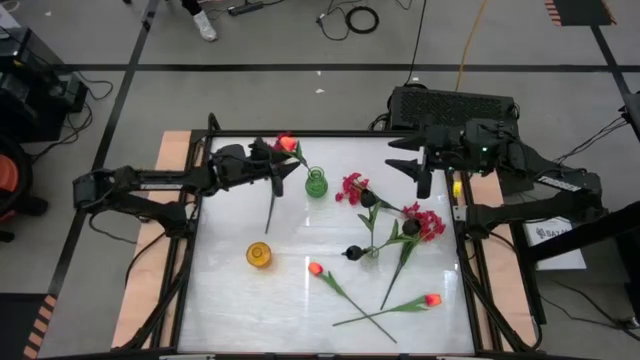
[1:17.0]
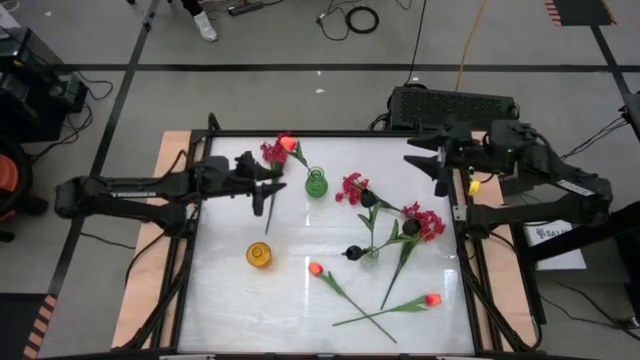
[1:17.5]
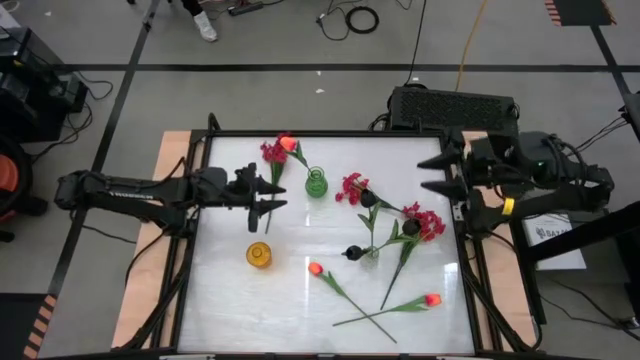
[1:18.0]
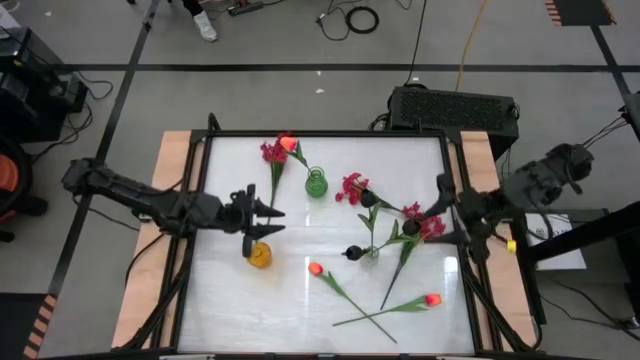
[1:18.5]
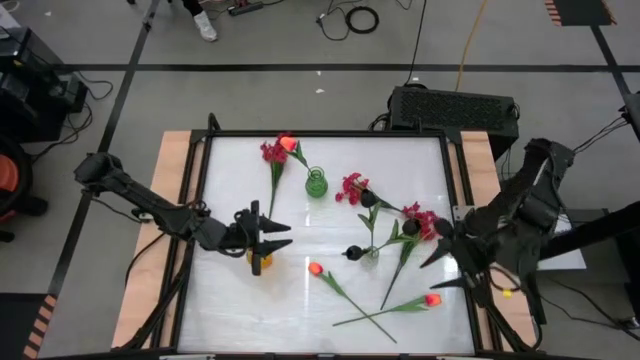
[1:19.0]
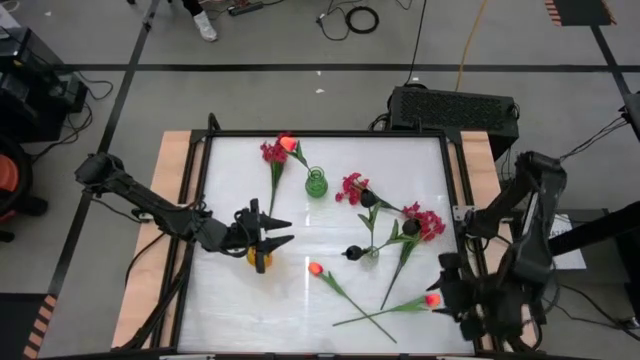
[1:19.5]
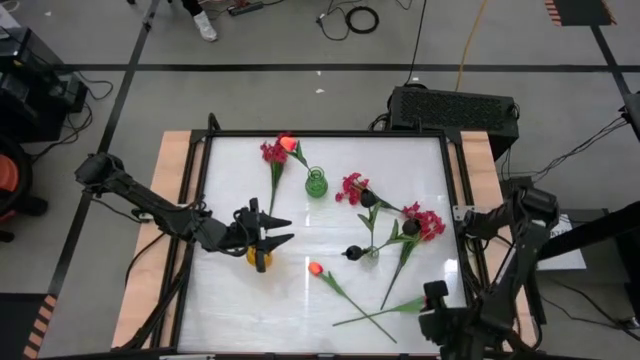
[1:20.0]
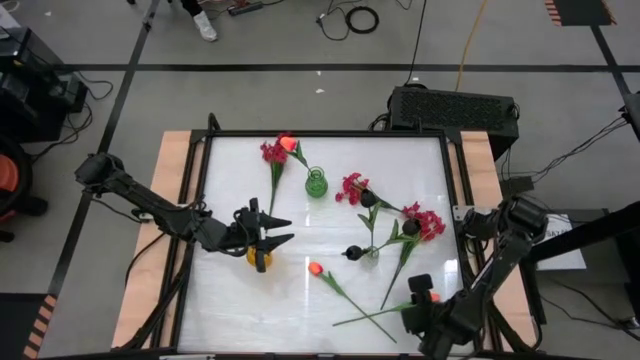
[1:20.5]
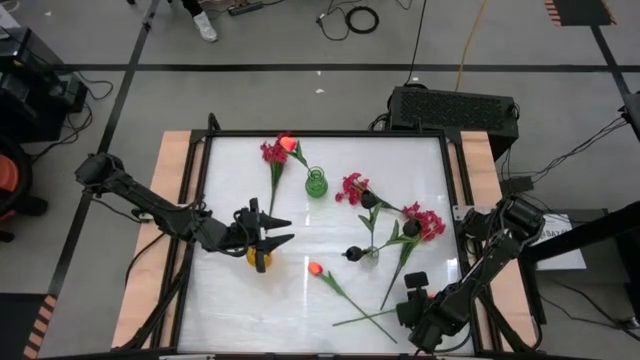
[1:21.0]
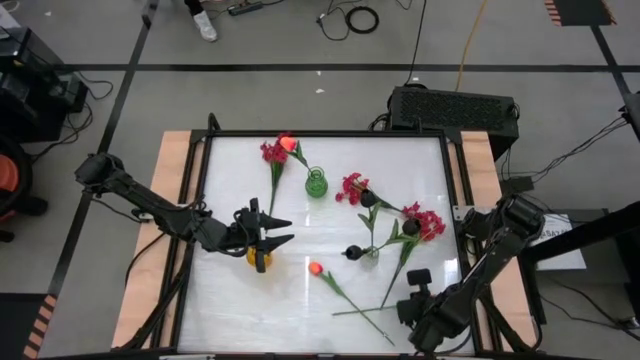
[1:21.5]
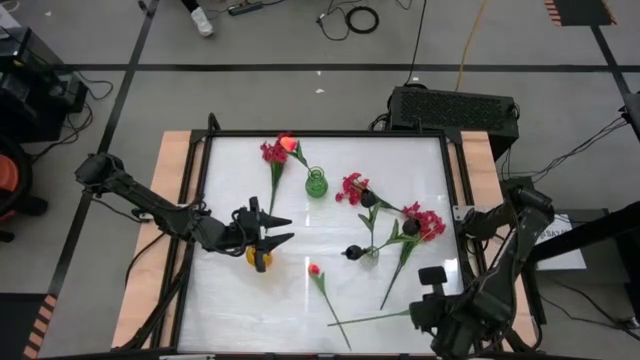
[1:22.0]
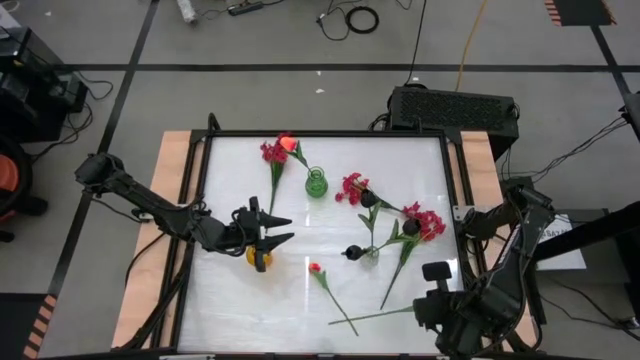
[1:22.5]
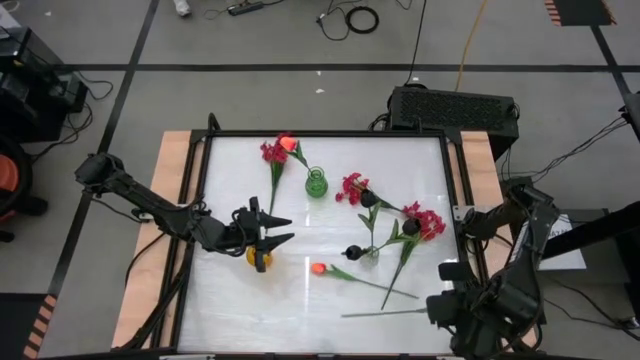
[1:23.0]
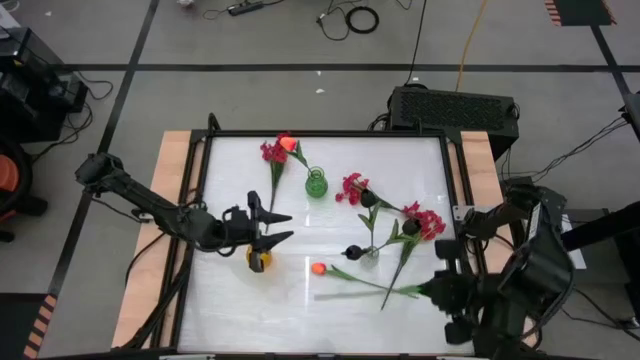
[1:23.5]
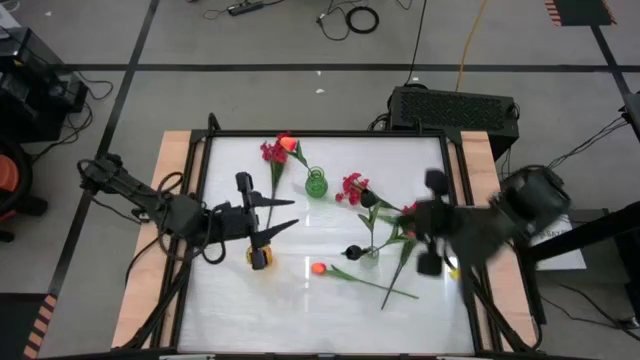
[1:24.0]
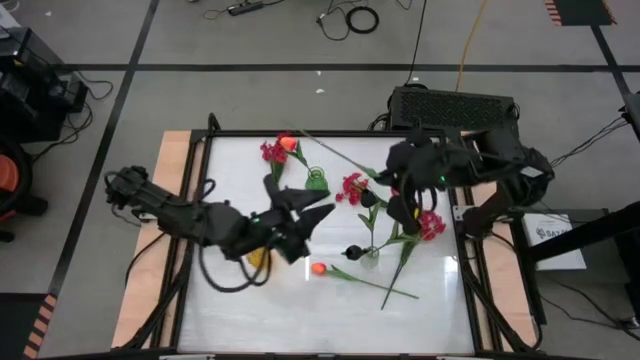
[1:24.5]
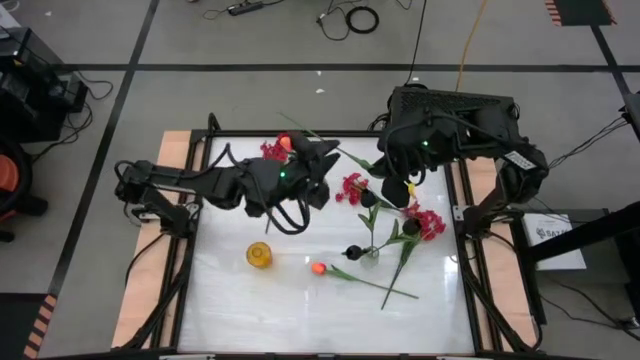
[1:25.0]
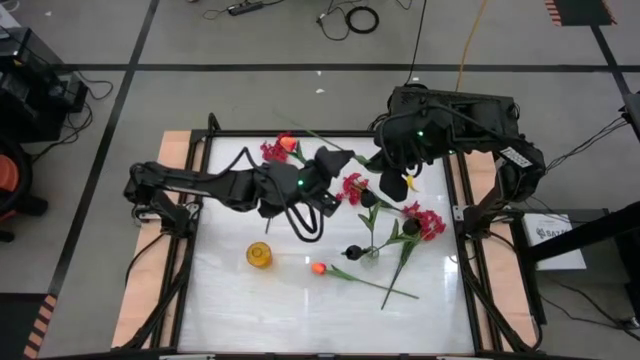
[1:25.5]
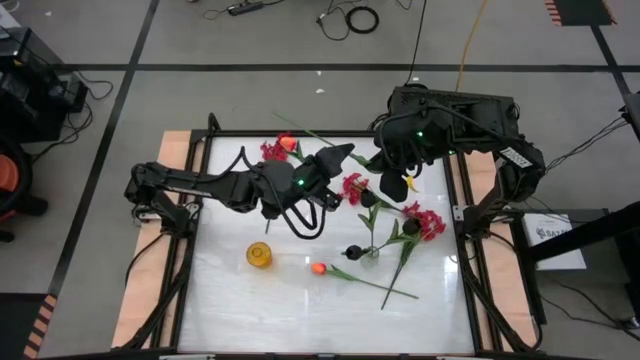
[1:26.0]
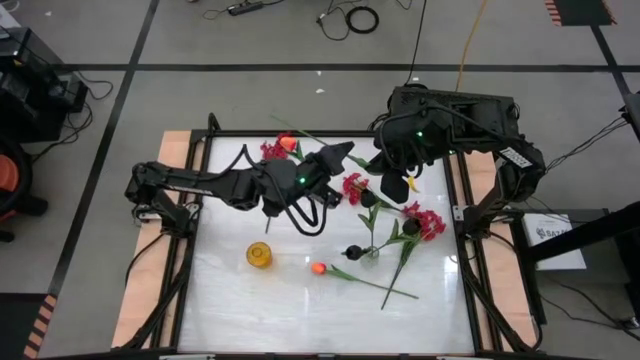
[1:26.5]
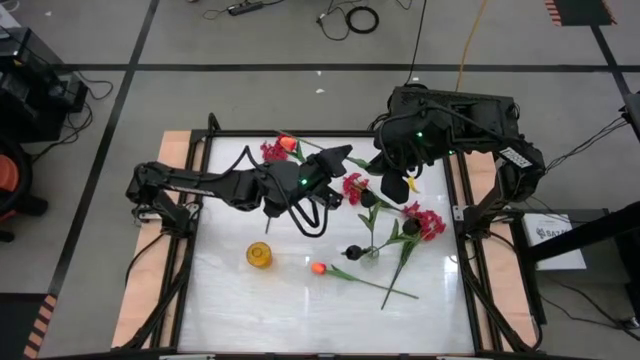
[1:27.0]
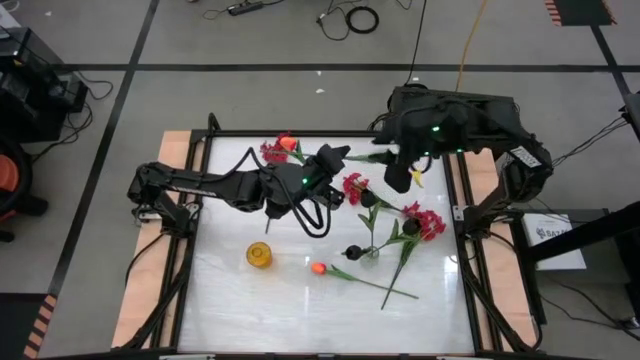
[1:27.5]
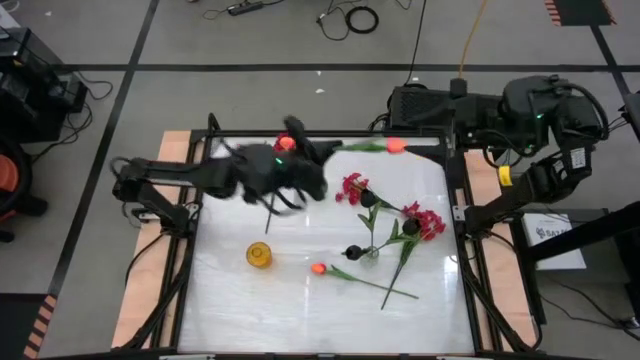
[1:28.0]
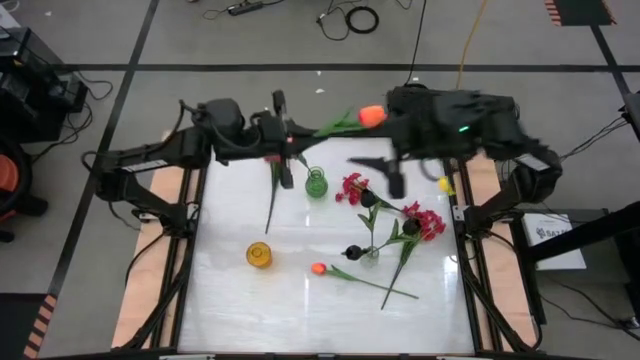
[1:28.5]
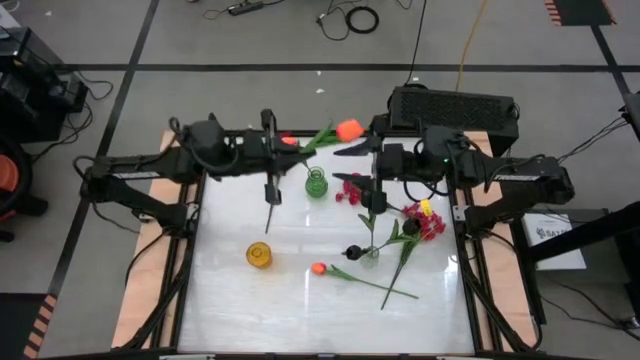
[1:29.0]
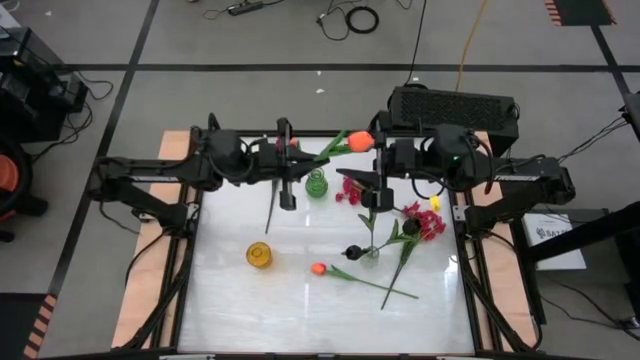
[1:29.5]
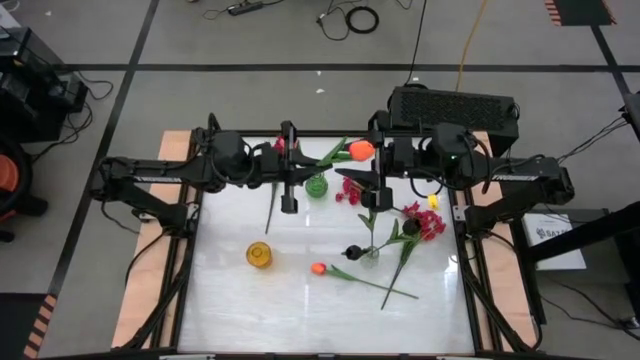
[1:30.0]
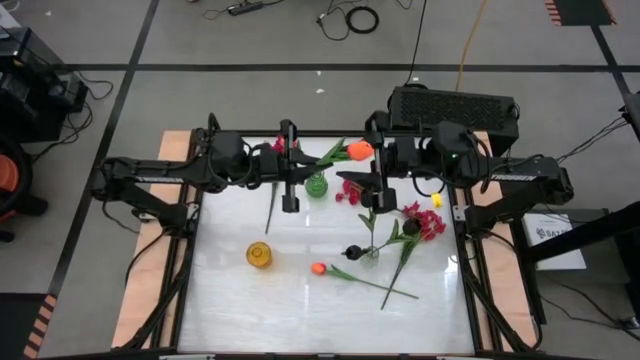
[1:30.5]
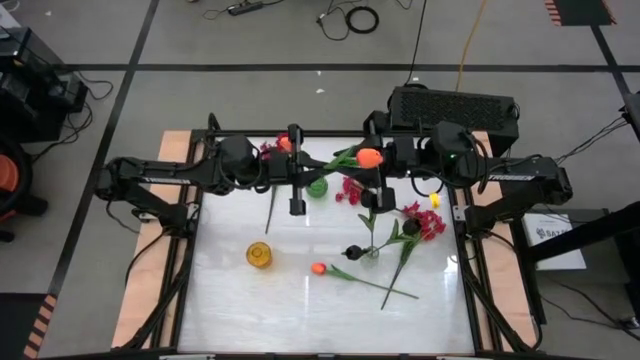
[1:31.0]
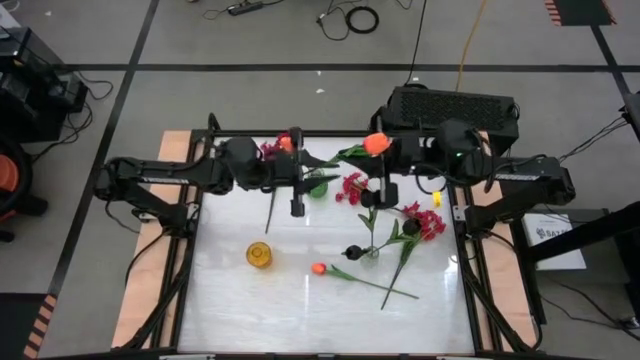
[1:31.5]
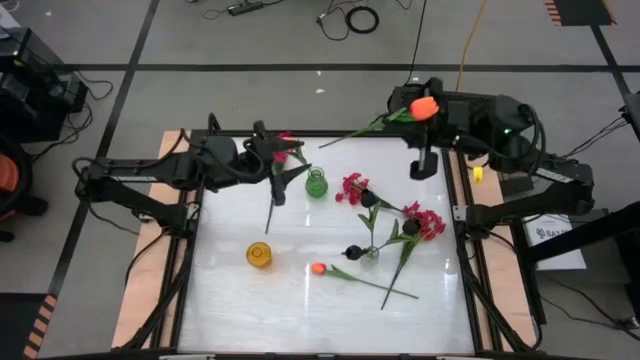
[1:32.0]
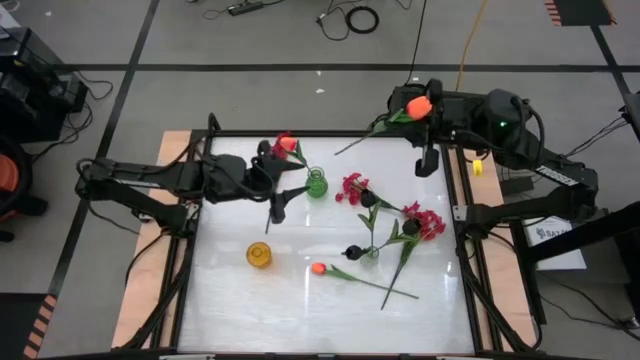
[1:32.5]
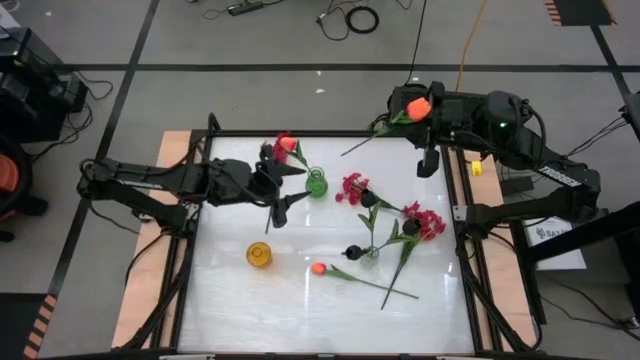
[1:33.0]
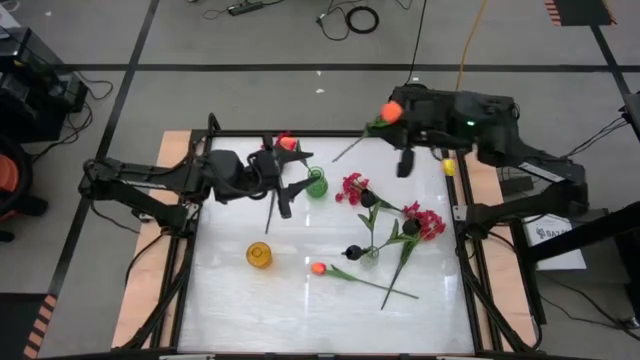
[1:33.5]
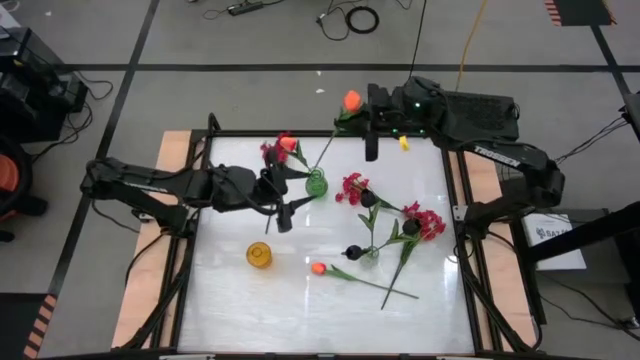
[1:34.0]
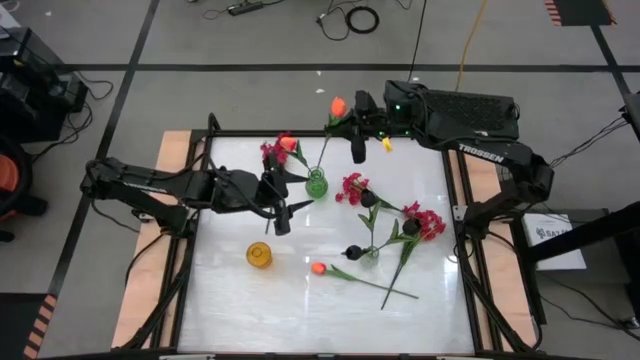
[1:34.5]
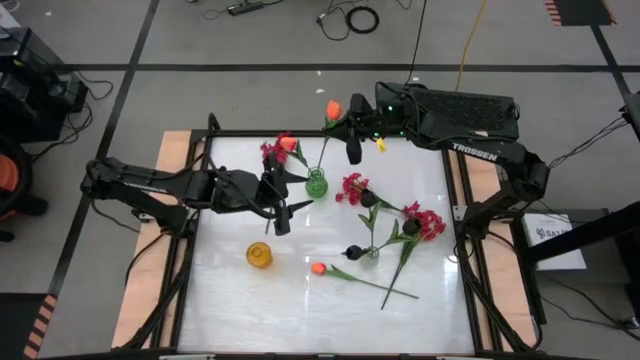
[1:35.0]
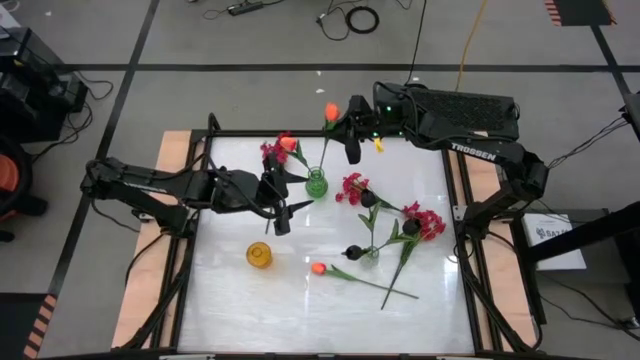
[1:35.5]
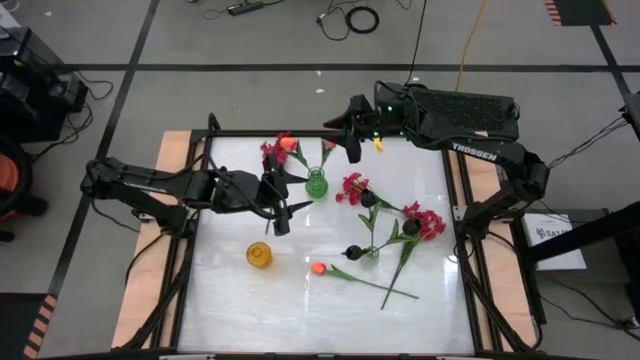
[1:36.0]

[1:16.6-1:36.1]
Task: Sort flowers into vase by color
Put the right orange flower into the green vase

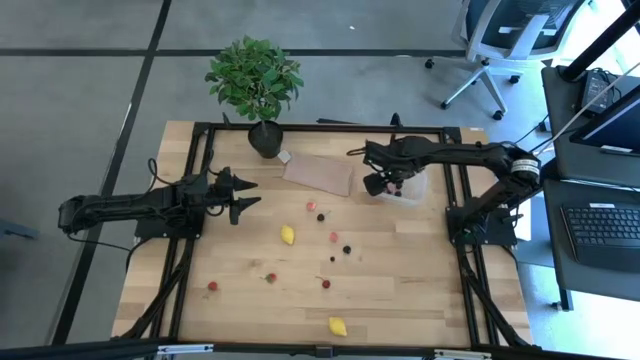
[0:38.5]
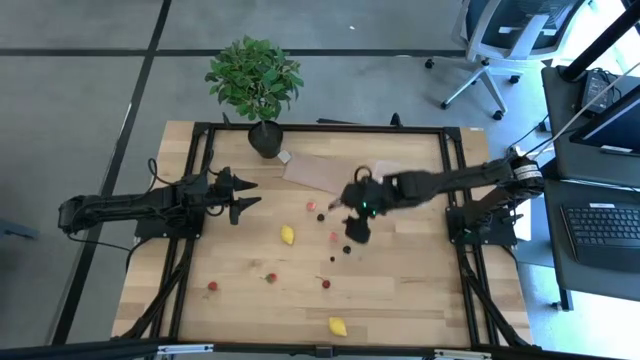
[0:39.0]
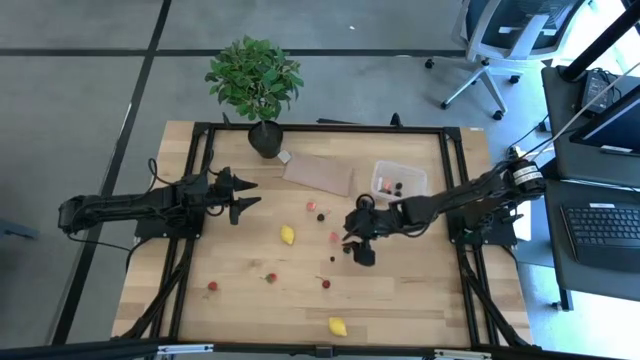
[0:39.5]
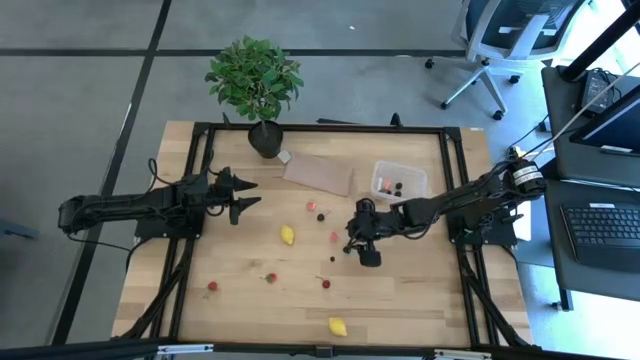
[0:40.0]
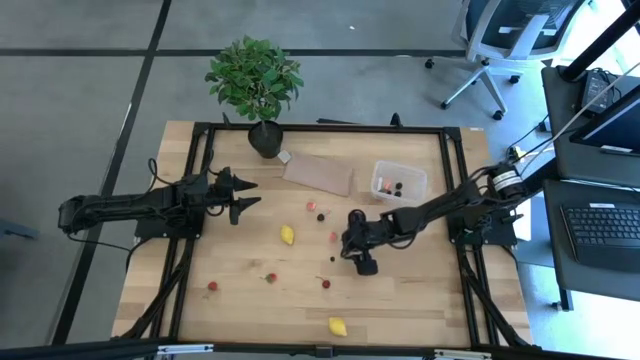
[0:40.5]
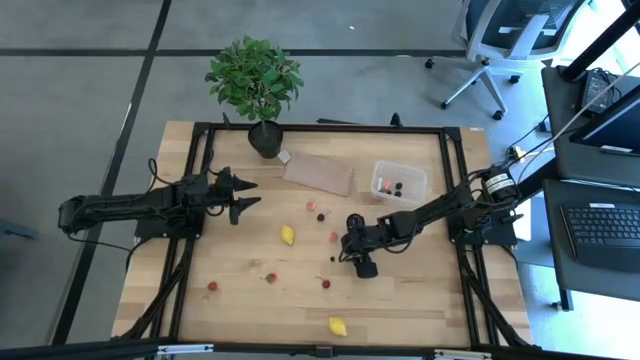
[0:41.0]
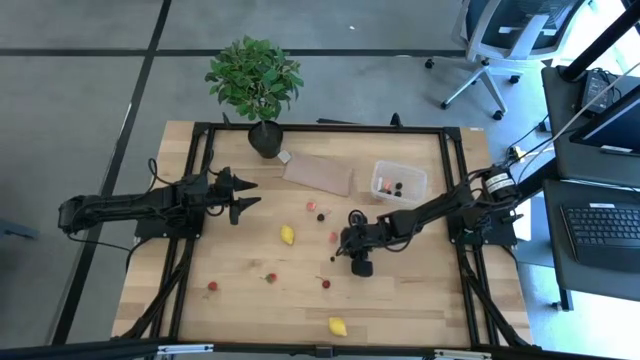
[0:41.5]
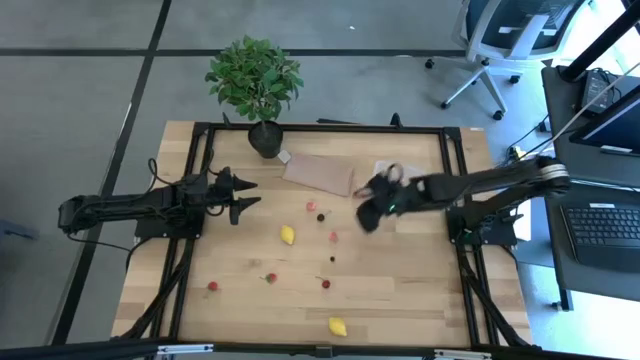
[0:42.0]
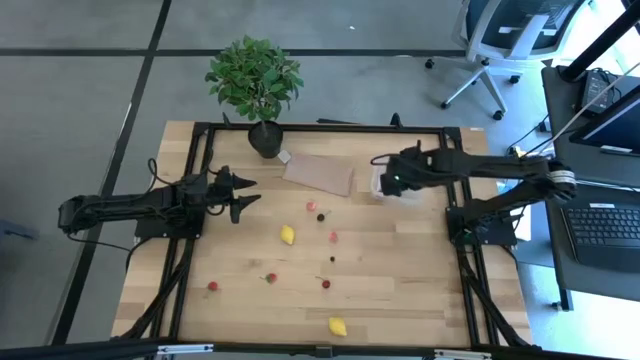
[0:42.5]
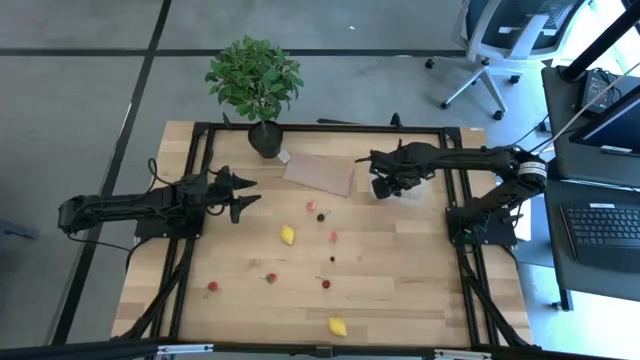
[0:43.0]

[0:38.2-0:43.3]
Task: Pick and placing Produce into tupperware
Put the right black cherry into the transparent container
